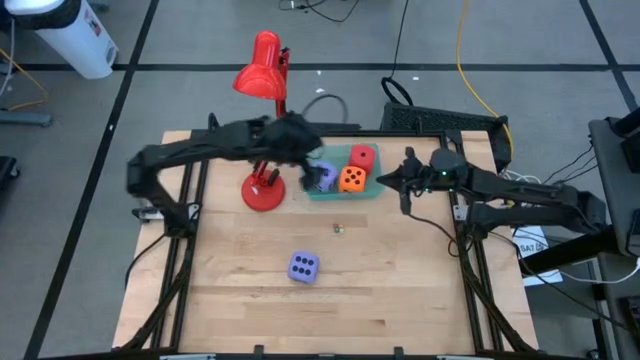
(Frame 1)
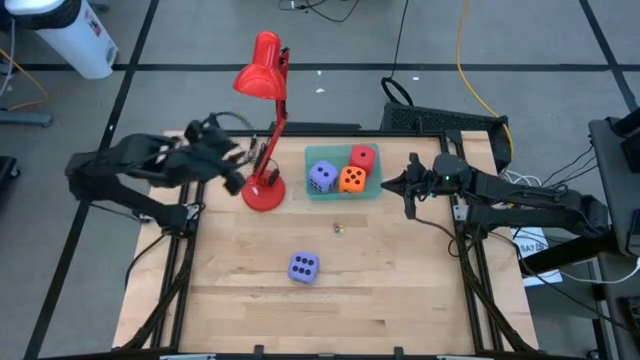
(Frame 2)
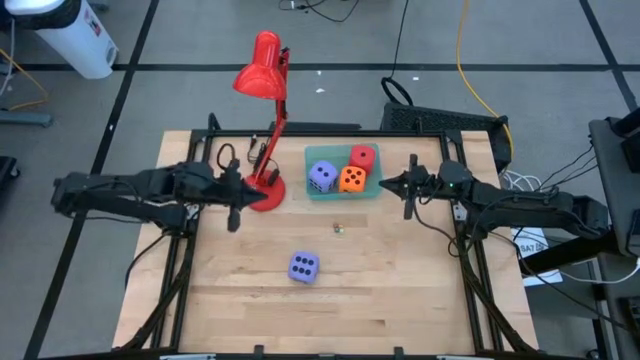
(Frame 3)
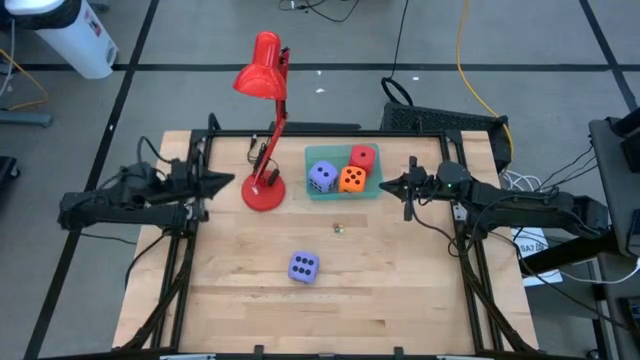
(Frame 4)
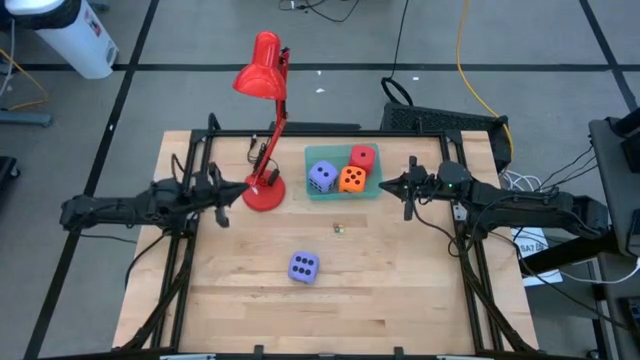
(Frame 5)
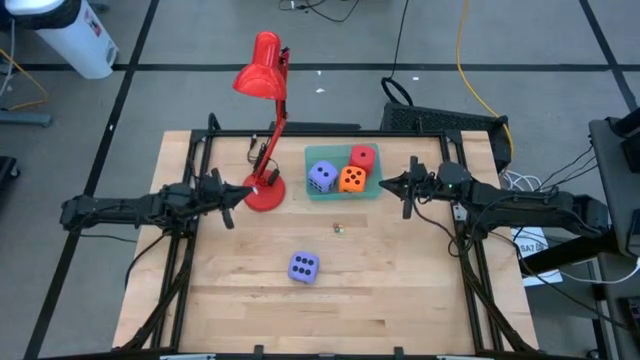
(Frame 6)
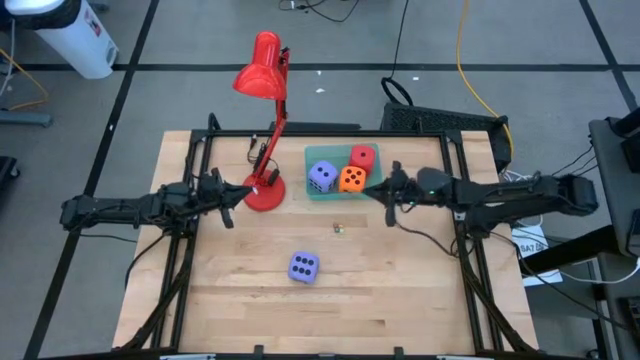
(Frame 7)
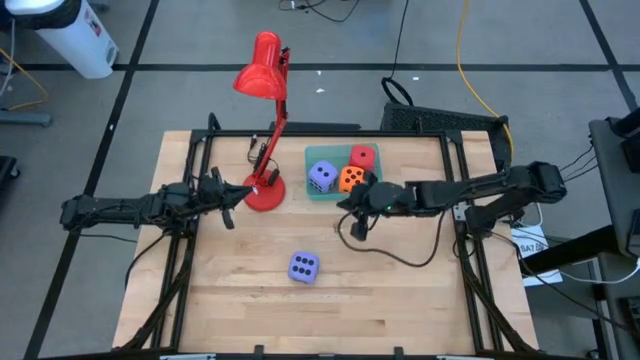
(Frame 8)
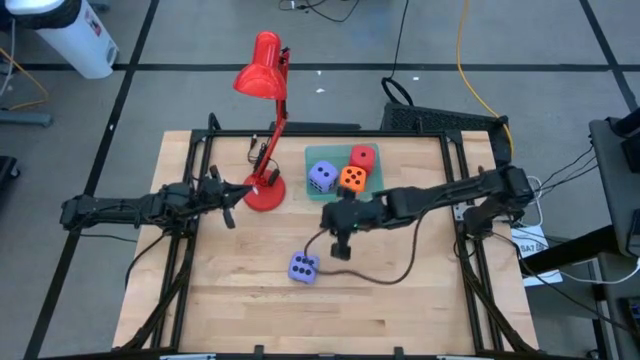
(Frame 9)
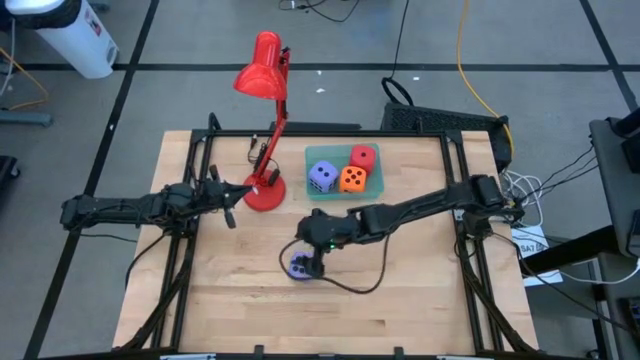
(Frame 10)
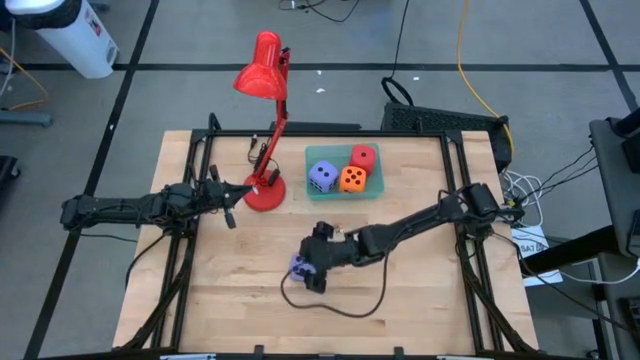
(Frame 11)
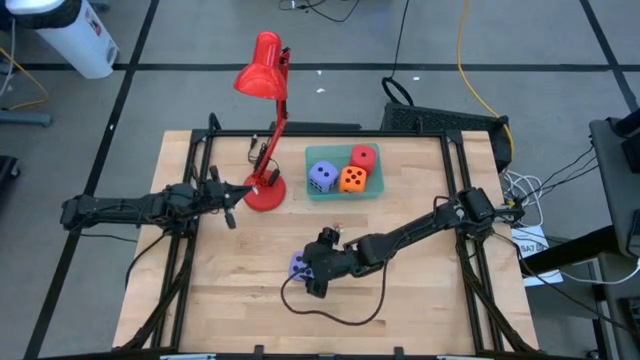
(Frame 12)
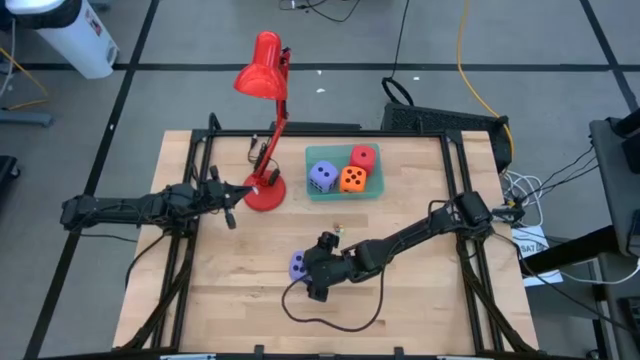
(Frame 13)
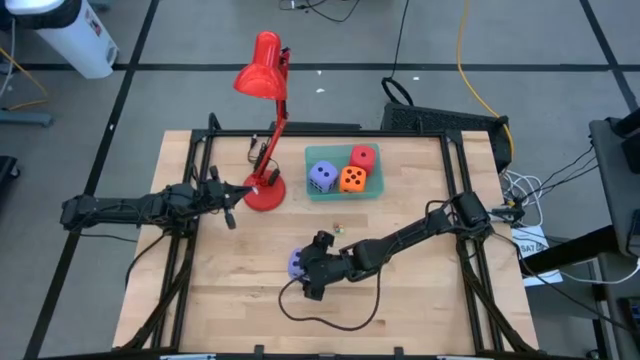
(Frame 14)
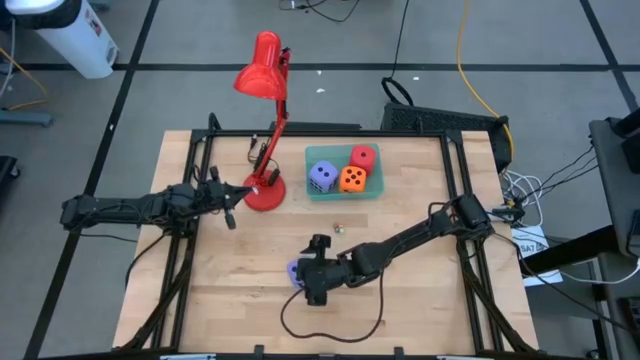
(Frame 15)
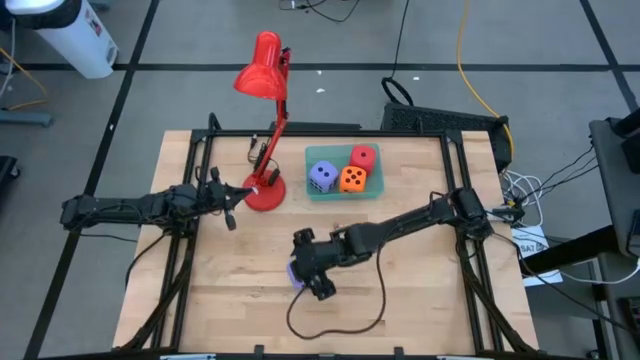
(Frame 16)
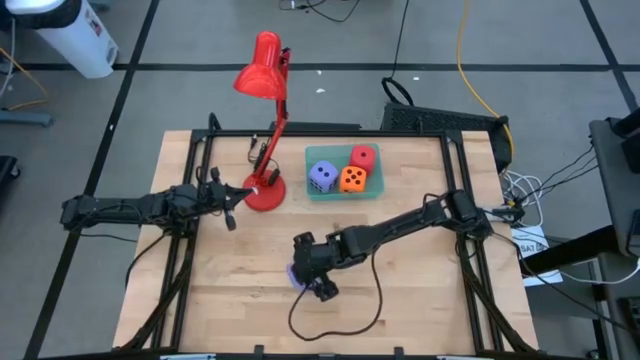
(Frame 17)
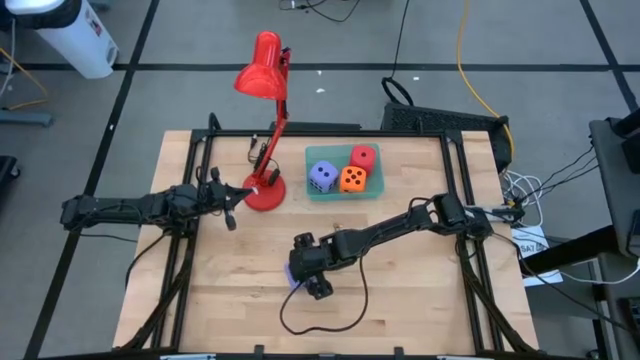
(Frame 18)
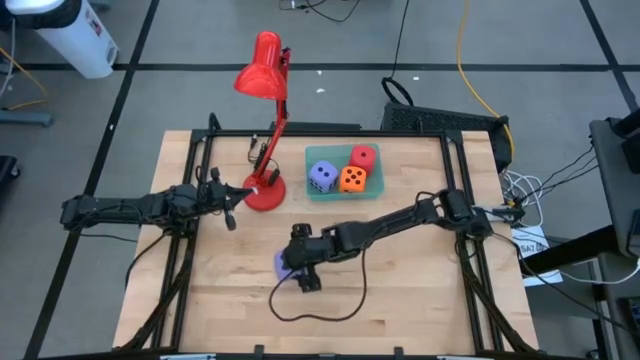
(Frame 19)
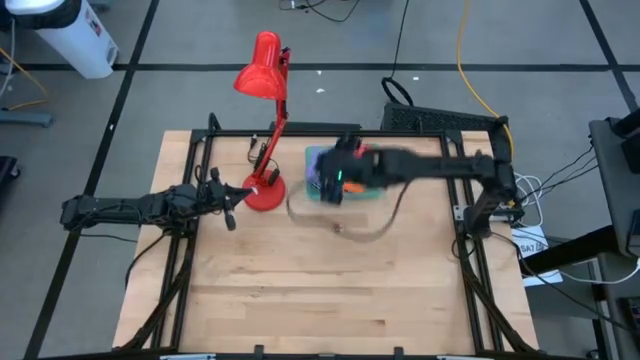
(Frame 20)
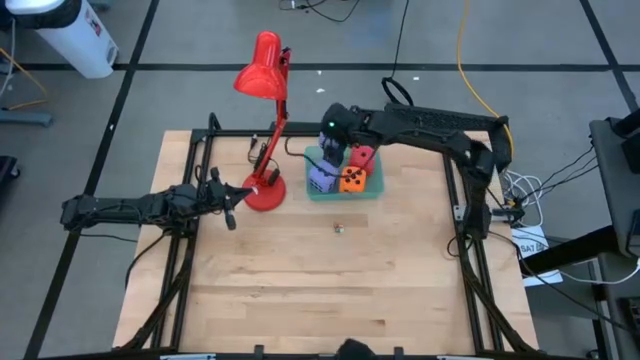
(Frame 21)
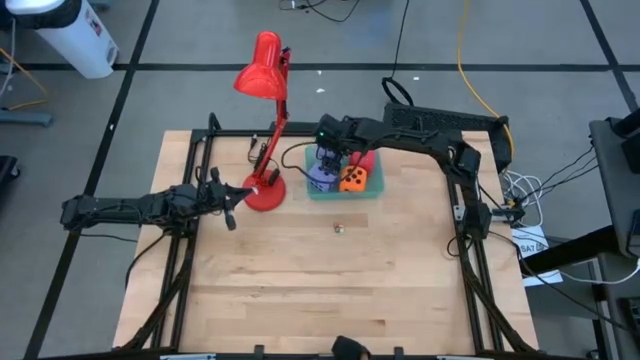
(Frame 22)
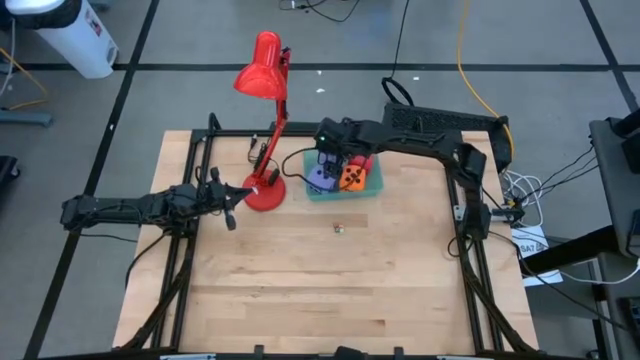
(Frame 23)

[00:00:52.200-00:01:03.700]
Task: Pick & Place Dice
Put the large purple die into the green bin

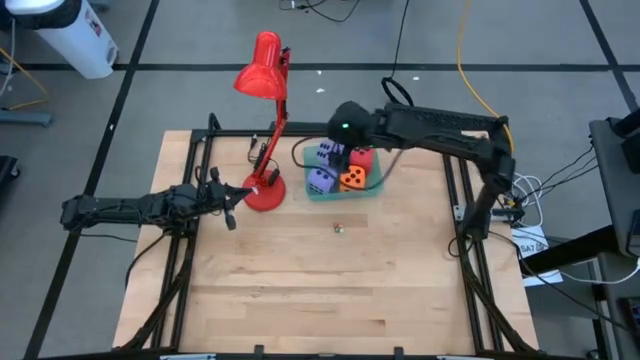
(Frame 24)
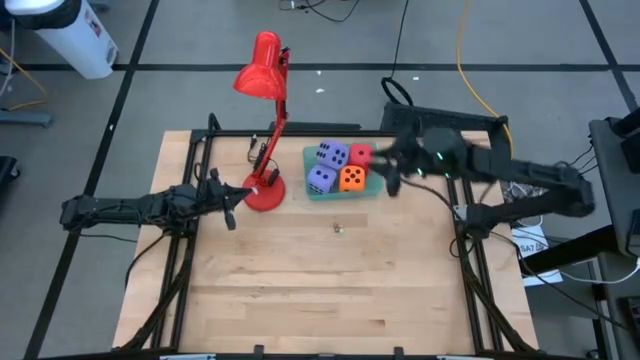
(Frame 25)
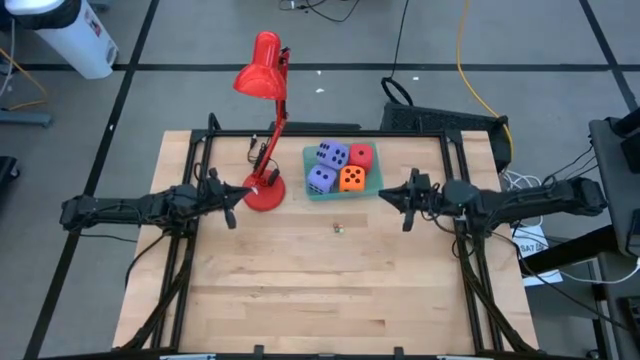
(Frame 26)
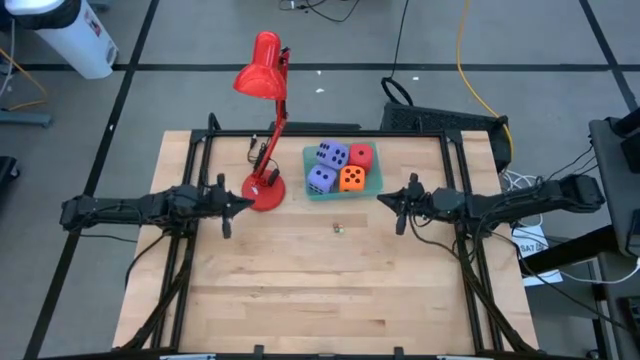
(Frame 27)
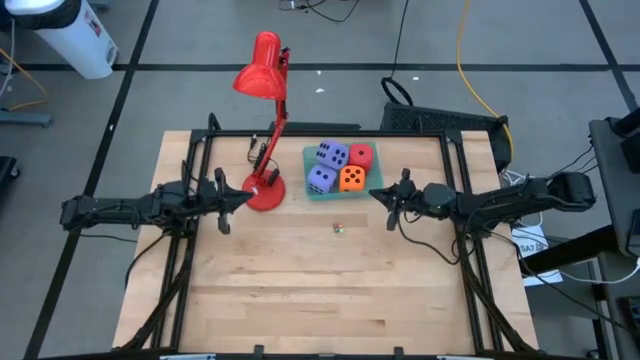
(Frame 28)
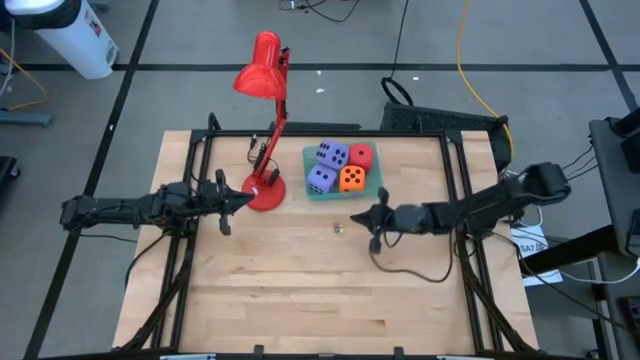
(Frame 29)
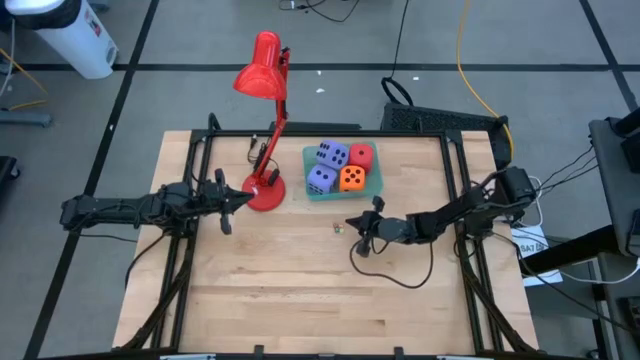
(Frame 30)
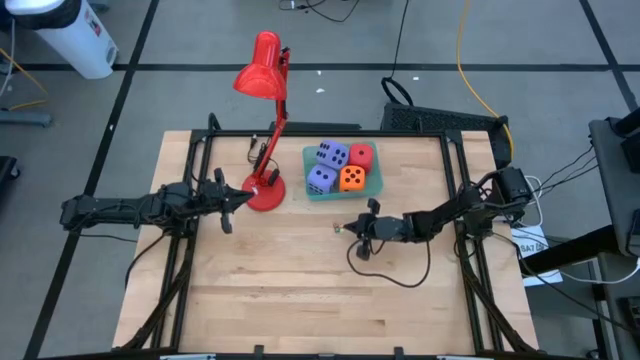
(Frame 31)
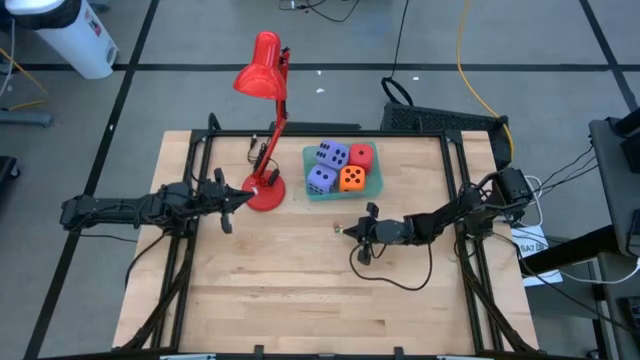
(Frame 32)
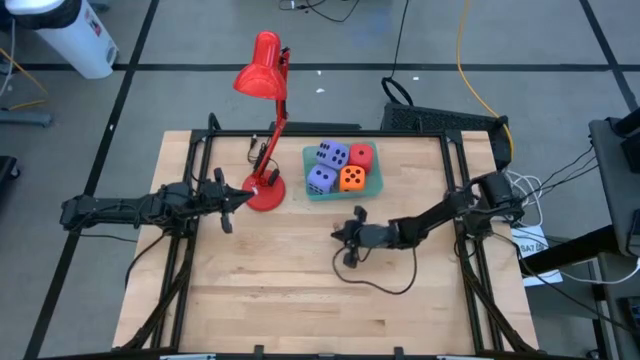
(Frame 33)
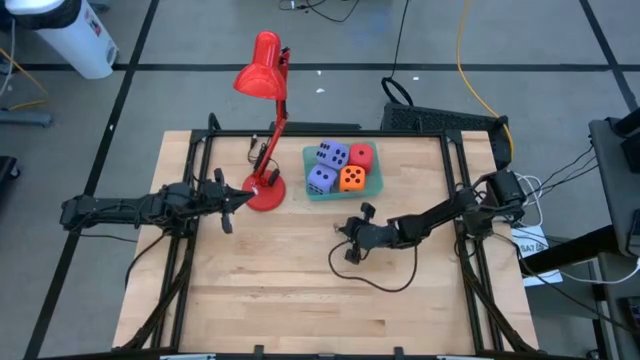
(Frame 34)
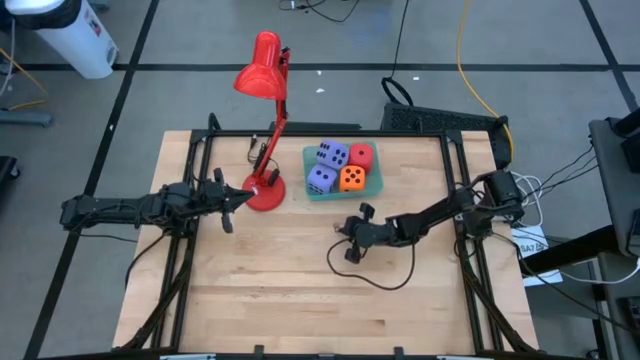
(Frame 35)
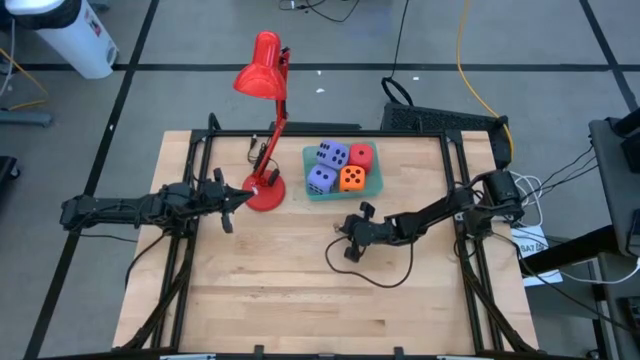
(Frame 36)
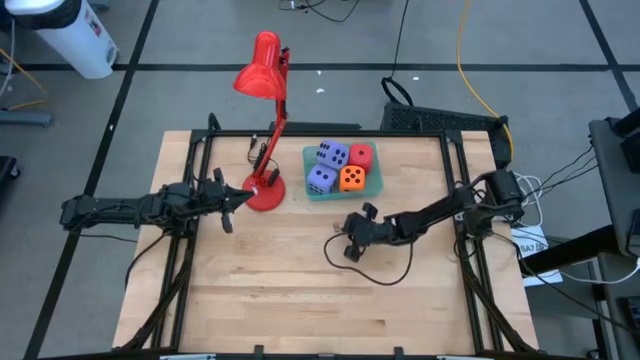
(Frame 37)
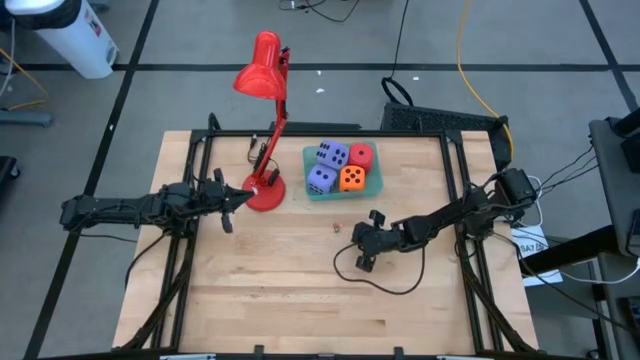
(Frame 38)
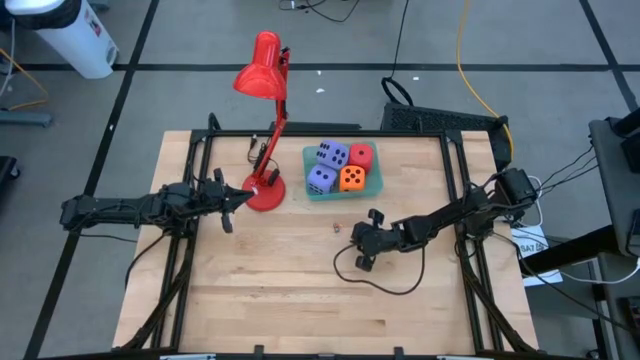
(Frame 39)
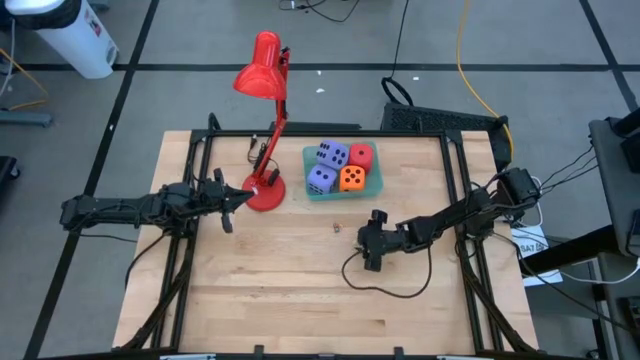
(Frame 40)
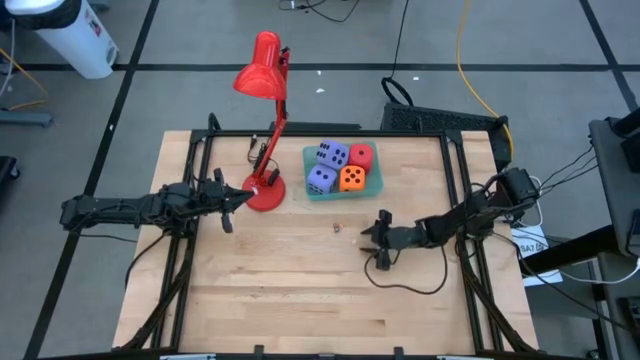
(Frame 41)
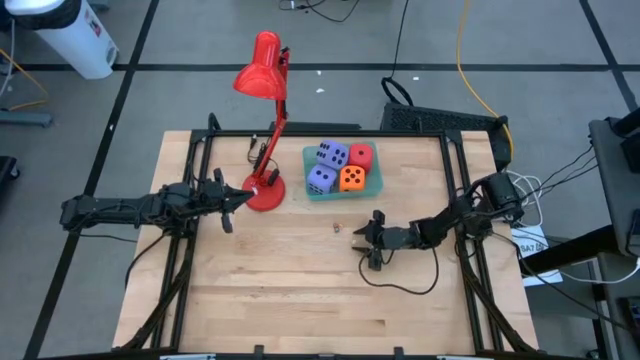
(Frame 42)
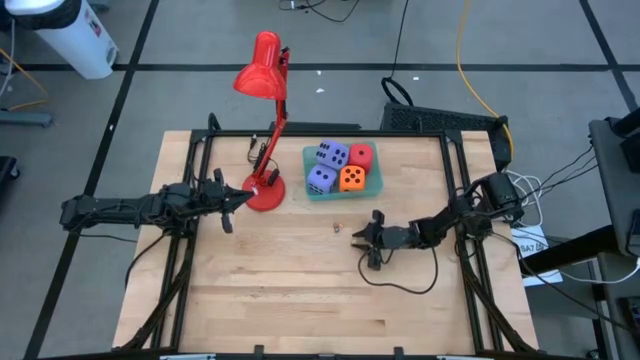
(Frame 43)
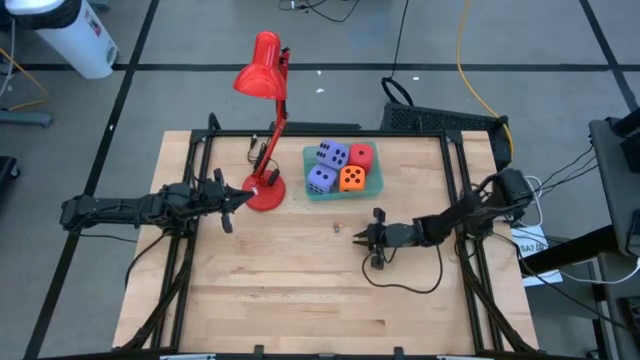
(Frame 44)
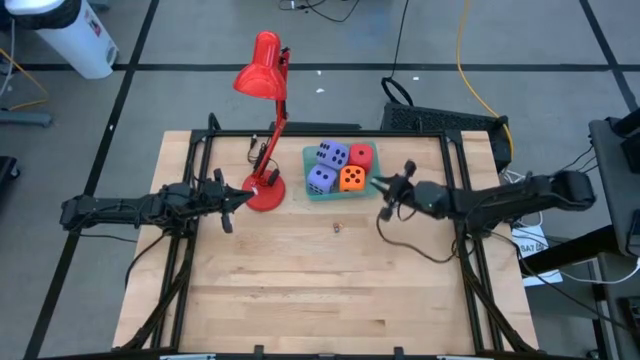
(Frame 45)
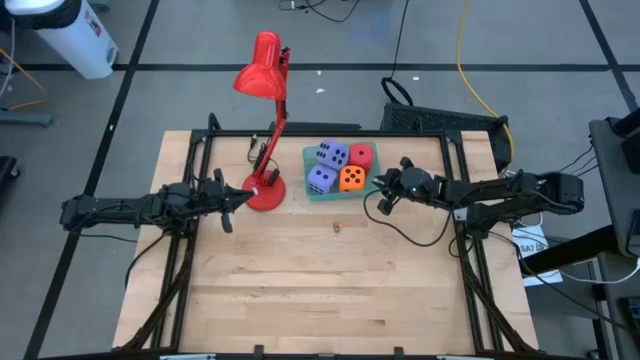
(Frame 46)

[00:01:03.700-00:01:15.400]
Put the light green small die into the green bin
